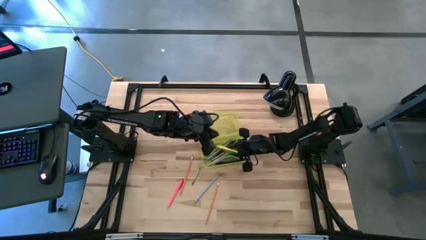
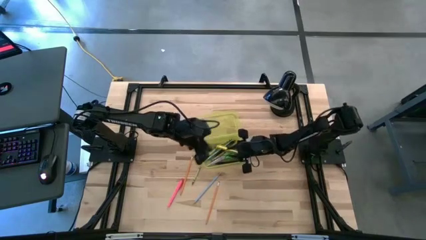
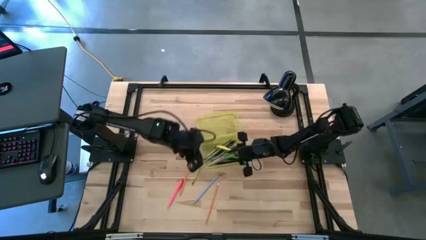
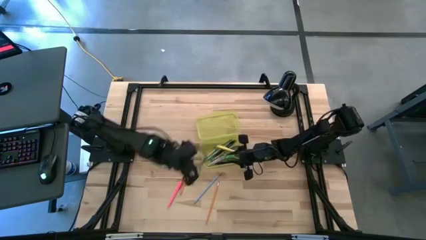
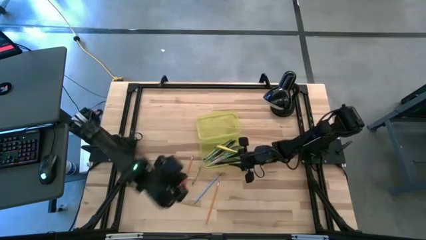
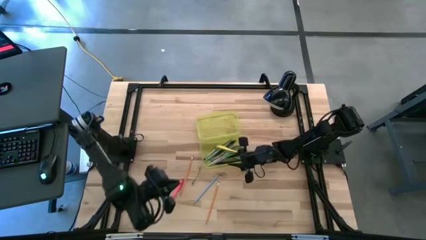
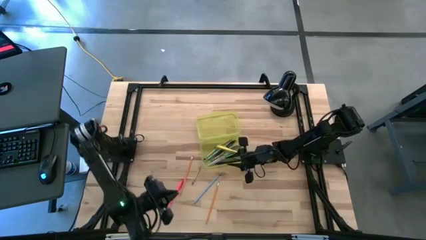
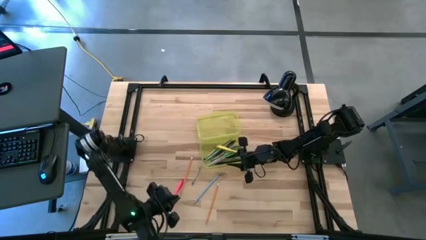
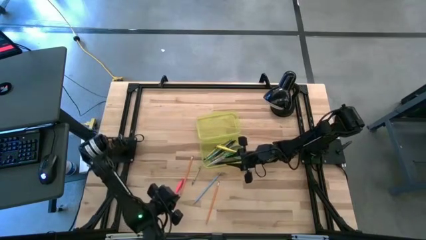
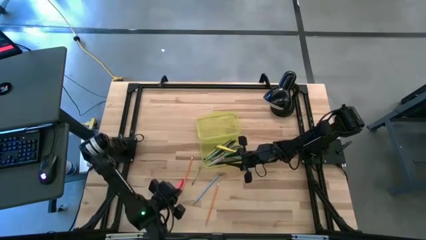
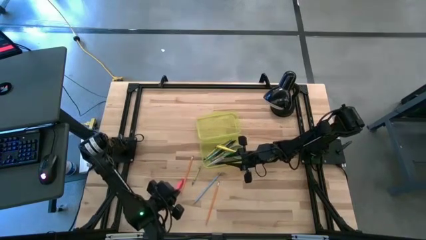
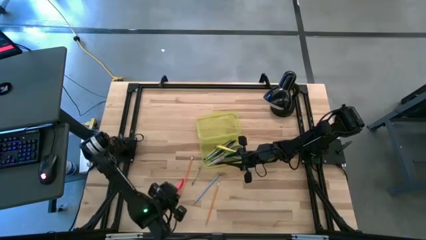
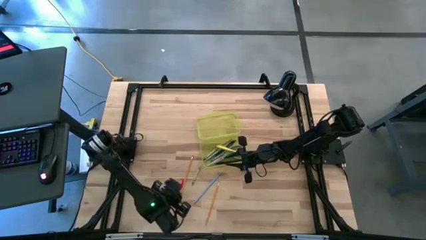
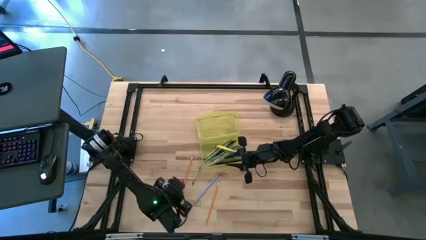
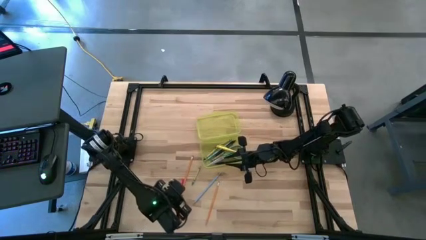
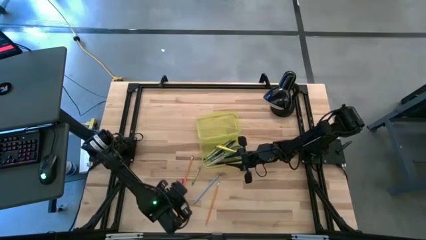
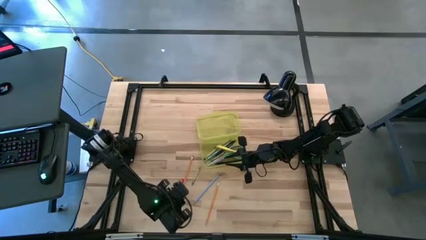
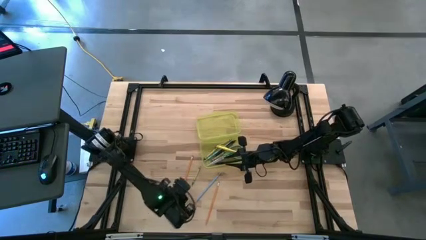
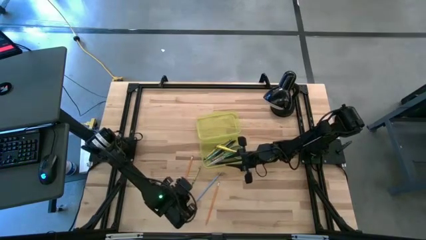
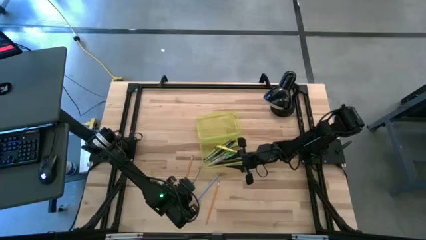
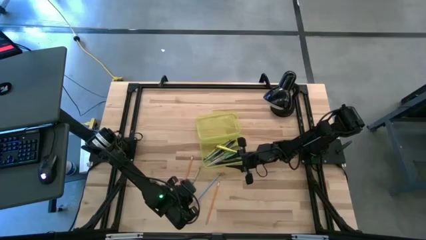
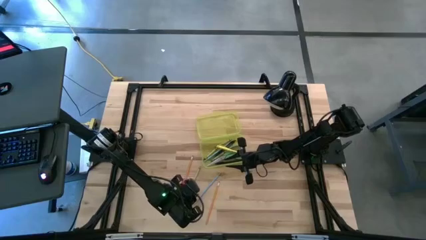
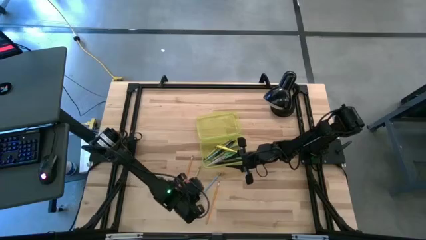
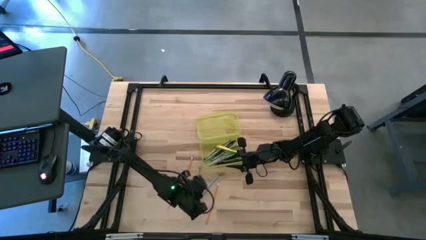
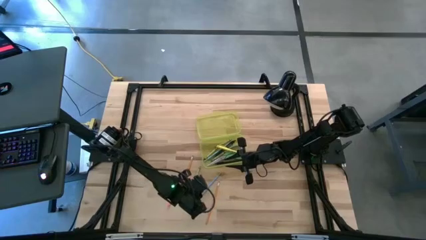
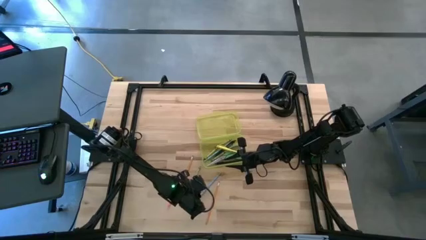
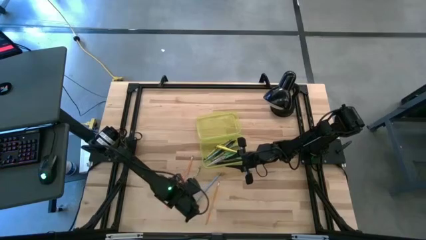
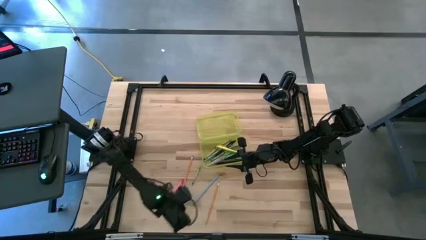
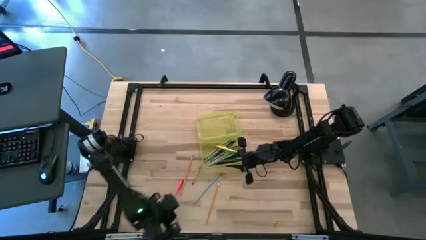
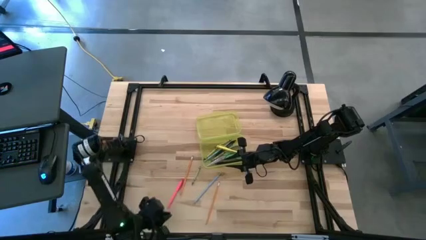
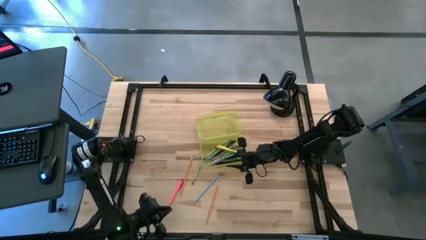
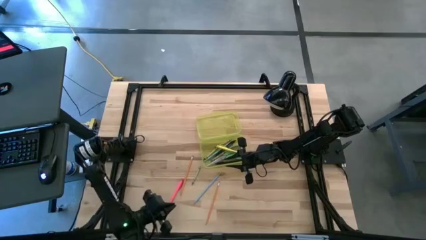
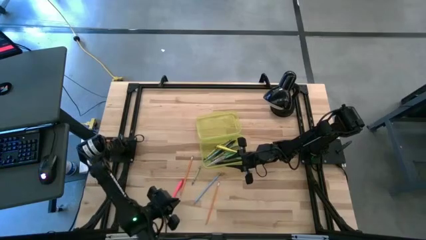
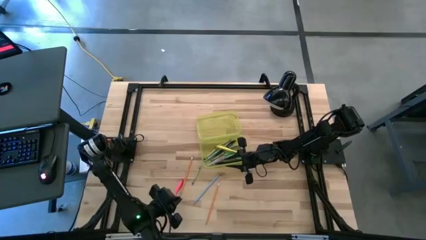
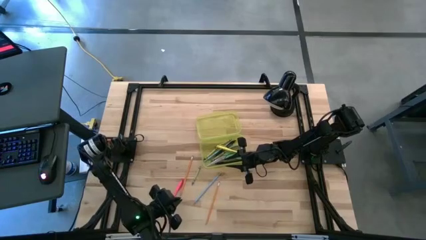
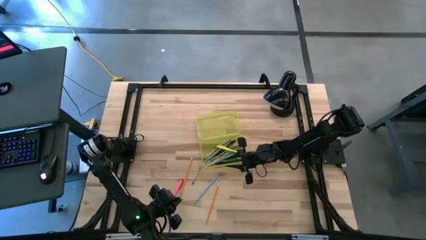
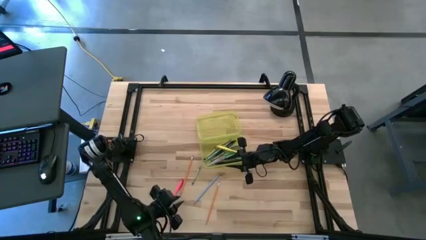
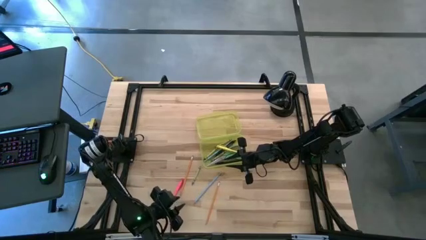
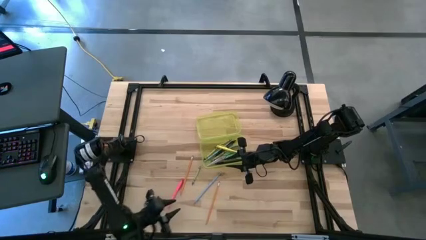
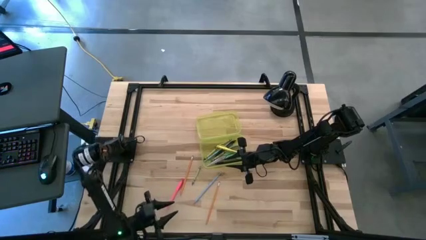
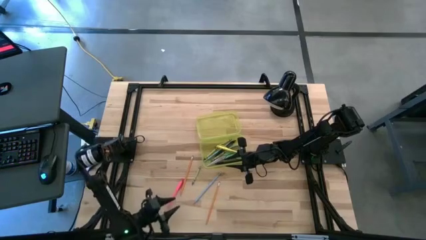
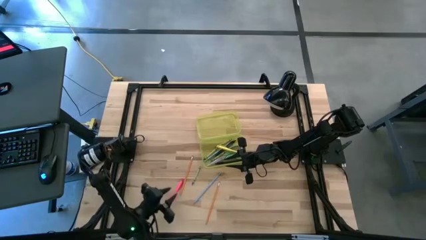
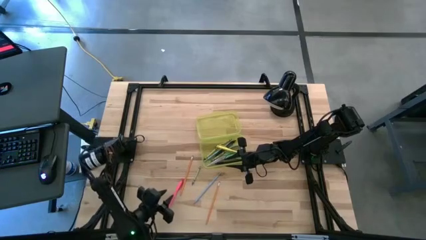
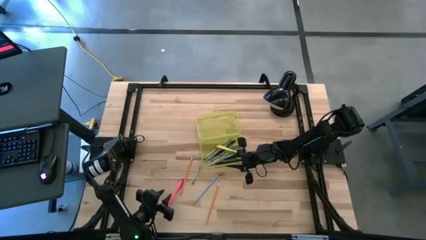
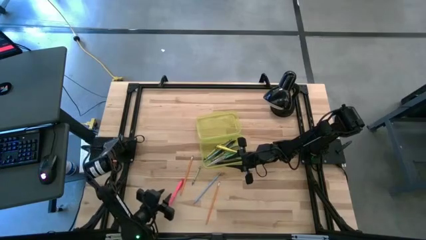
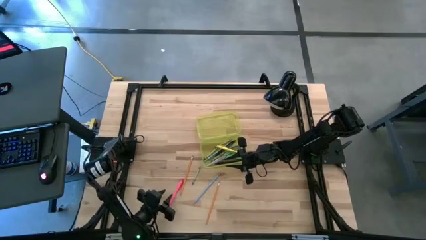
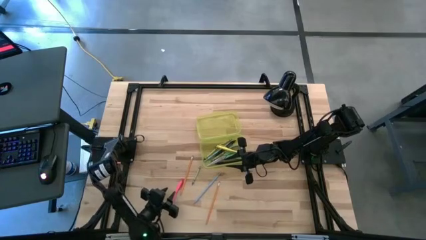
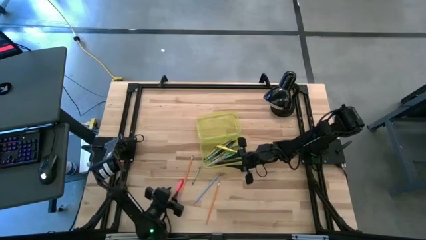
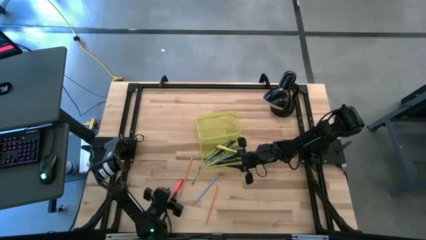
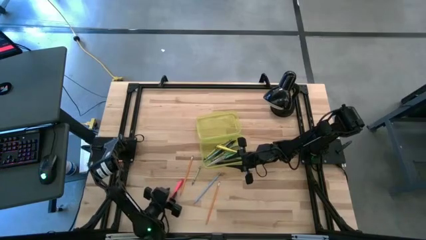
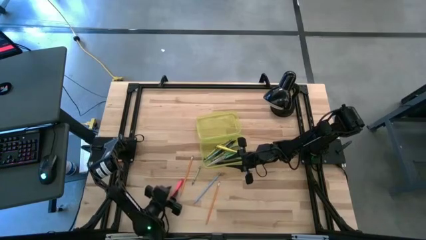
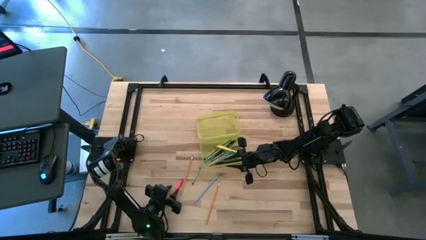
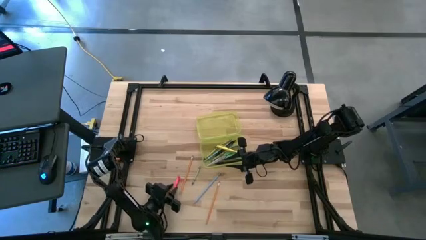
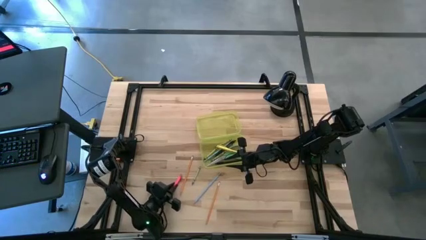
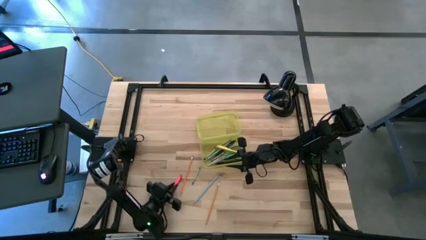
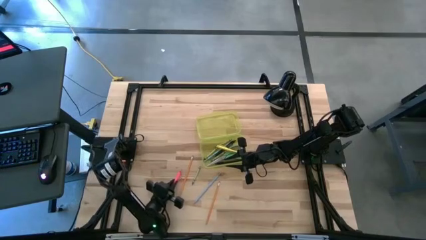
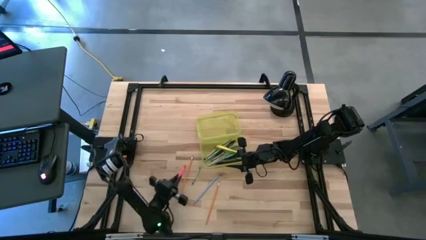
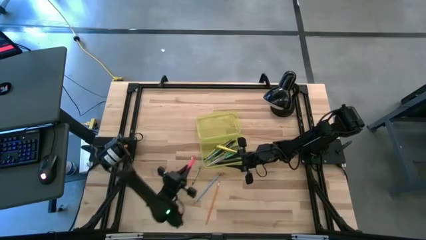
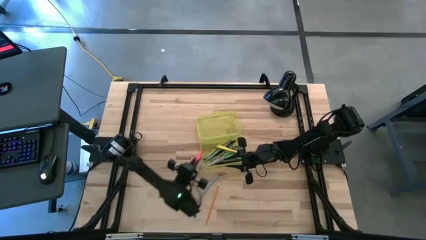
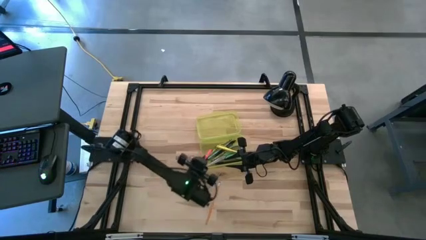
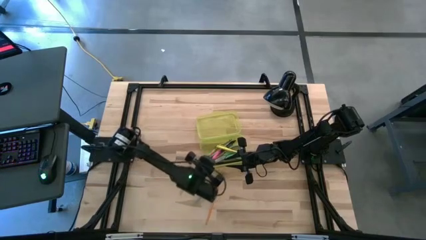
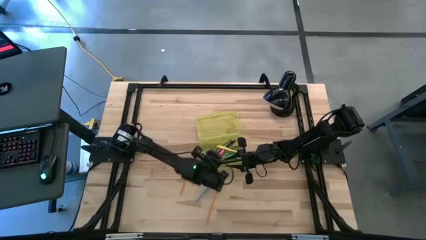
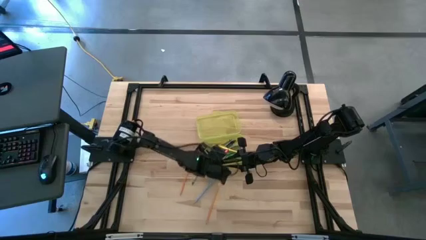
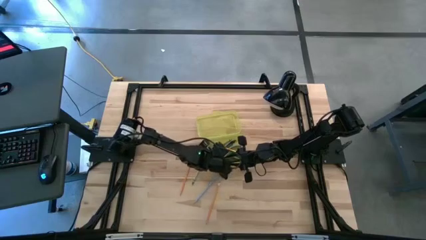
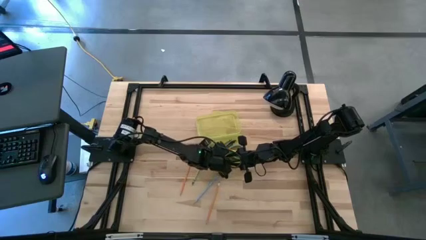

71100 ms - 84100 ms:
Task: Pick & place school supplies into a supply box
Put the pink pen into the yellow supply box

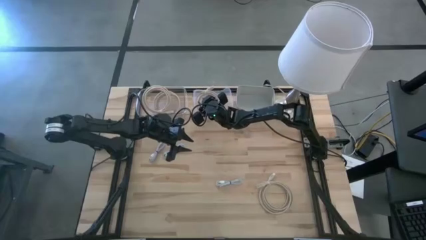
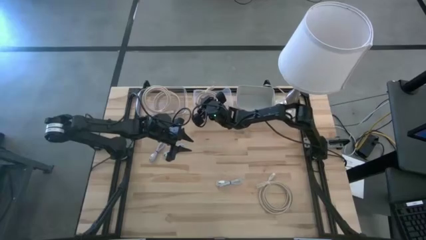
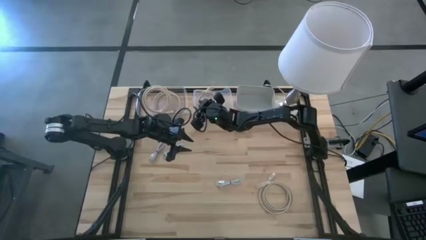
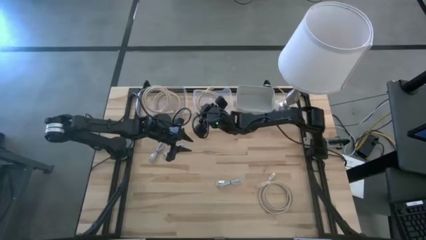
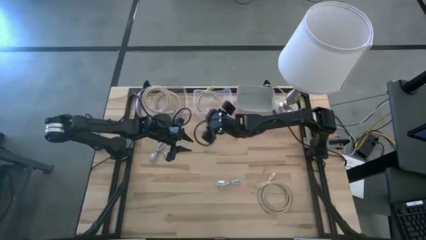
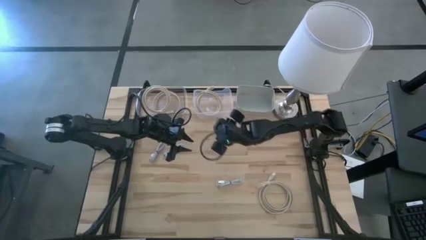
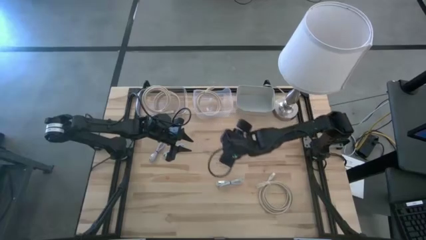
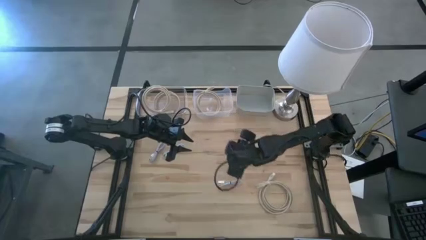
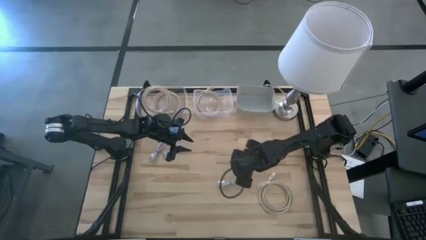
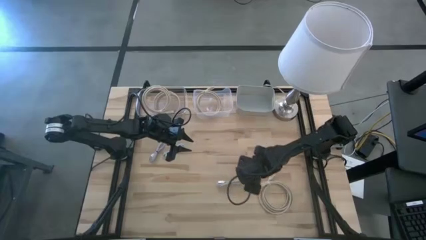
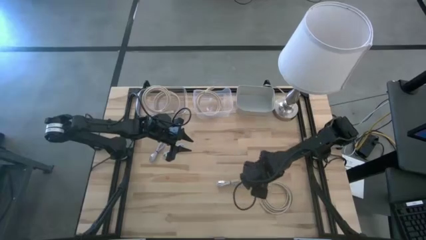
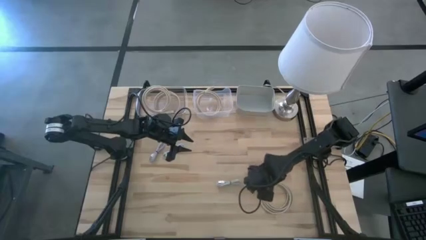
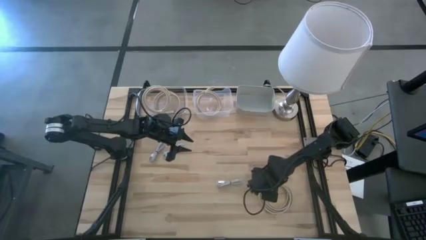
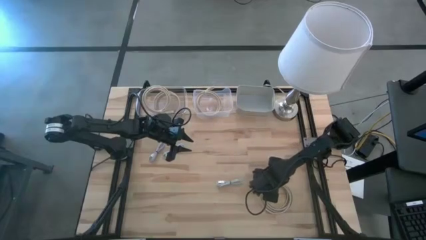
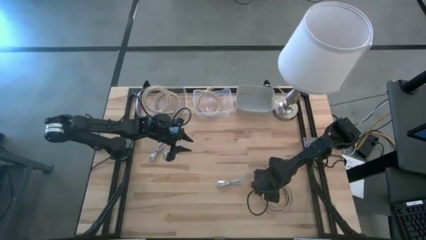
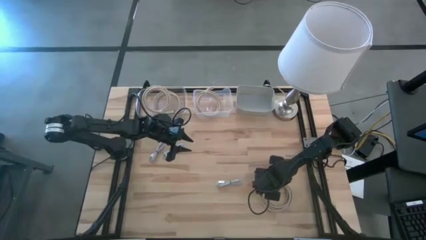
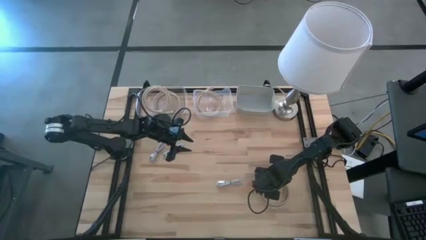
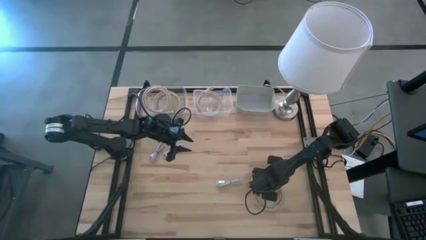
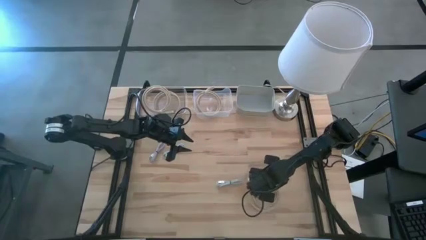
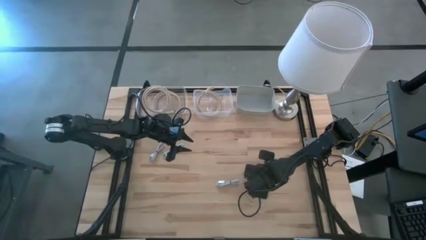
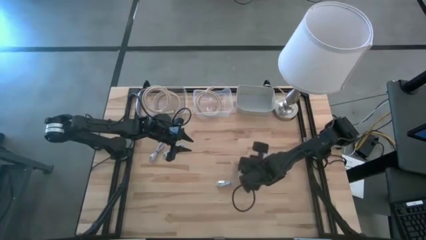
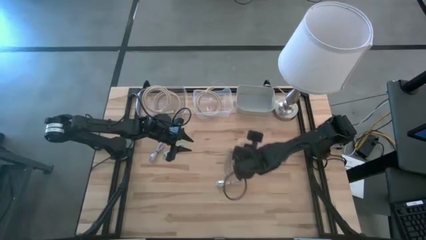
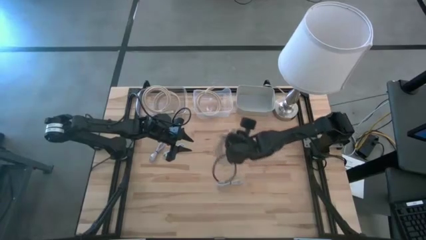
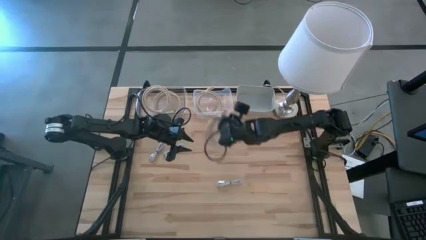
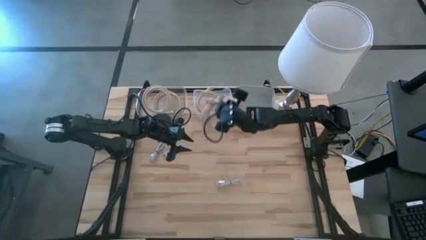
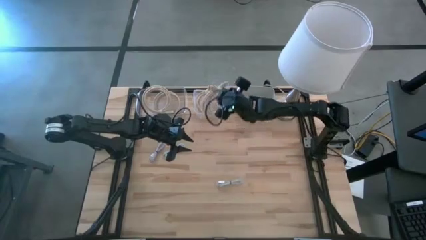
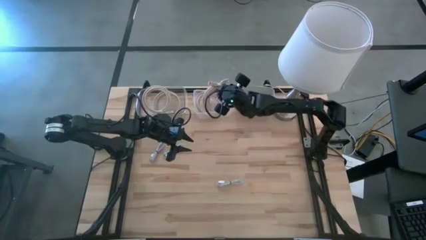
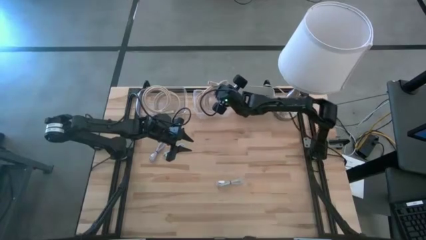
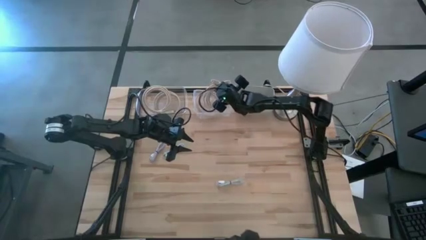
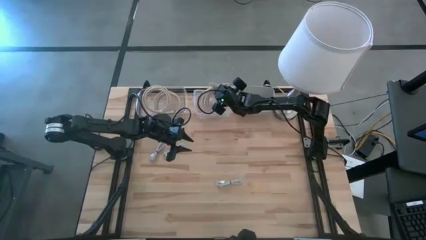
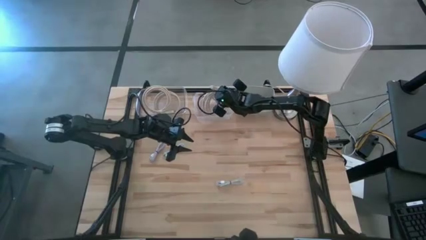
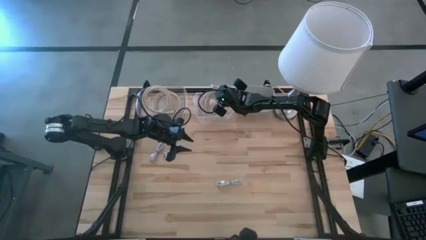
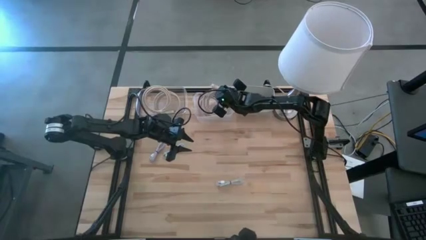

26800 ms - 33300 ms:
Task: Pick & Place USB Port
Put the brown HDMI cable into the right transparent bin
